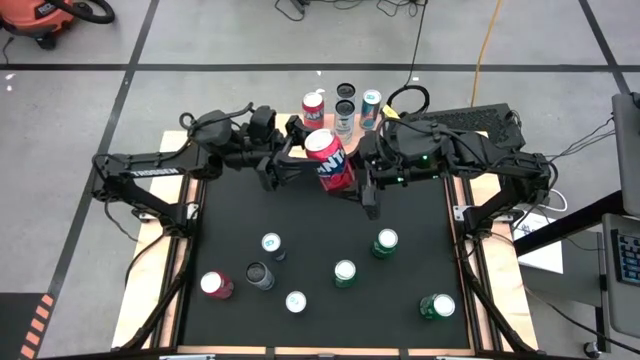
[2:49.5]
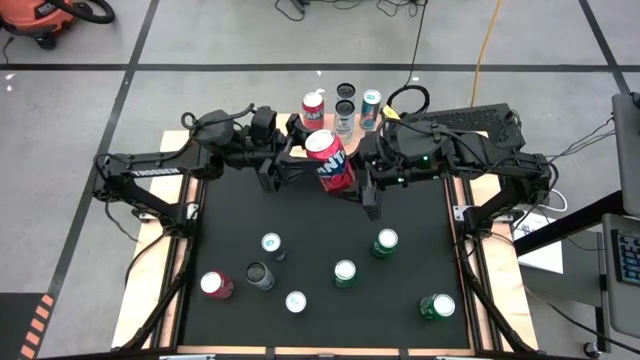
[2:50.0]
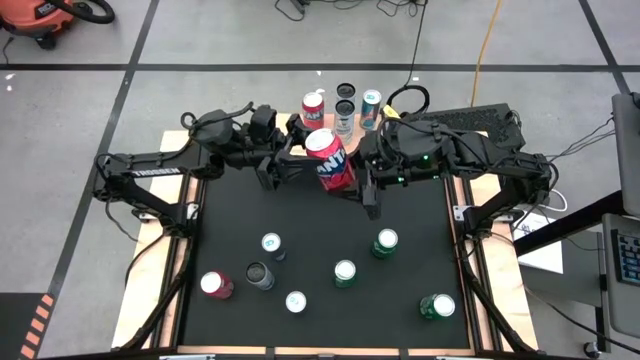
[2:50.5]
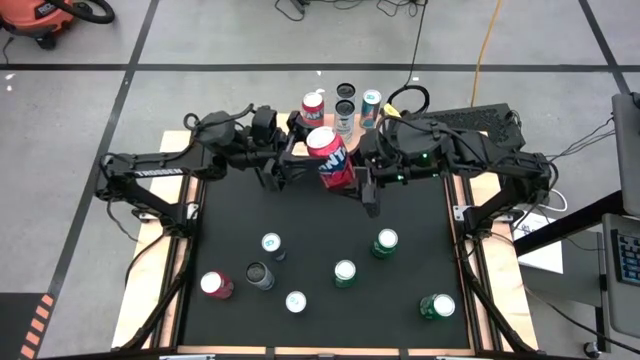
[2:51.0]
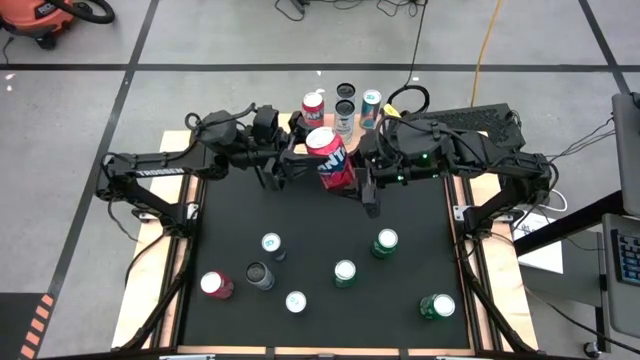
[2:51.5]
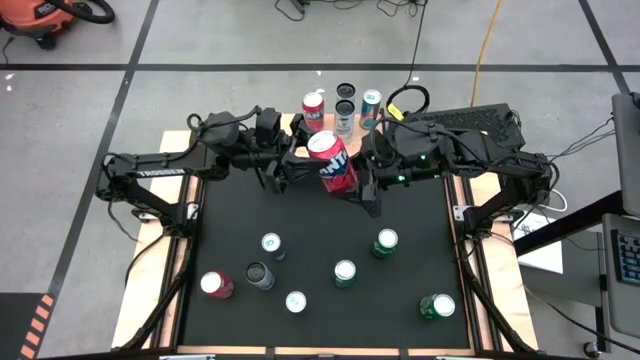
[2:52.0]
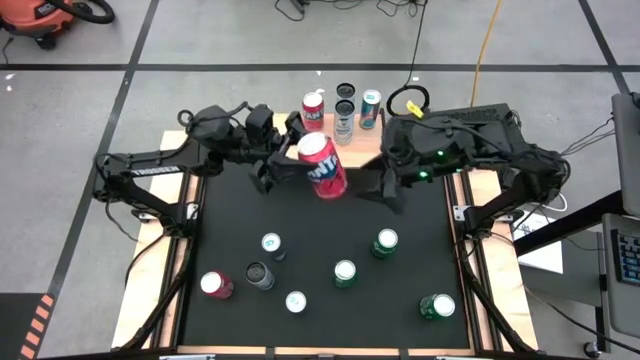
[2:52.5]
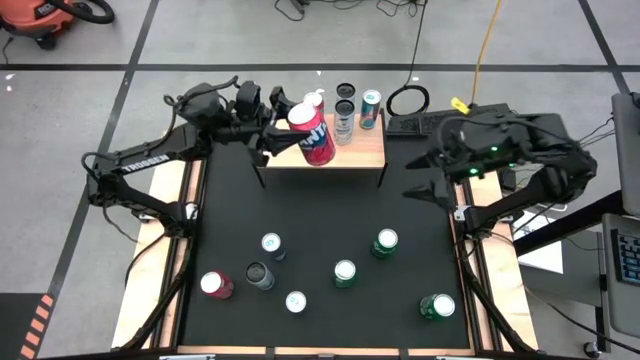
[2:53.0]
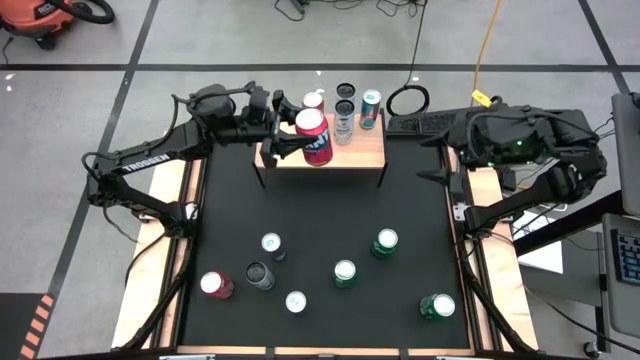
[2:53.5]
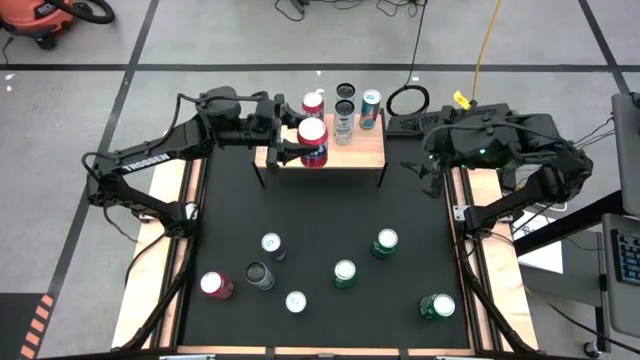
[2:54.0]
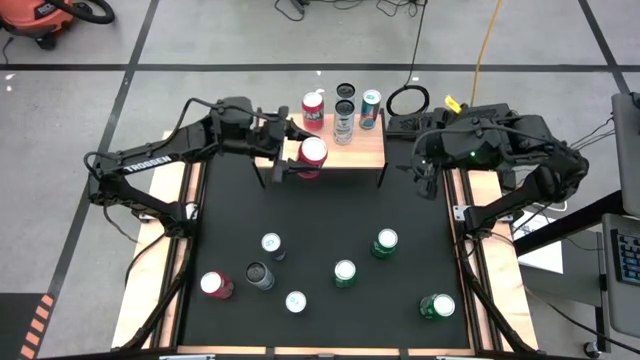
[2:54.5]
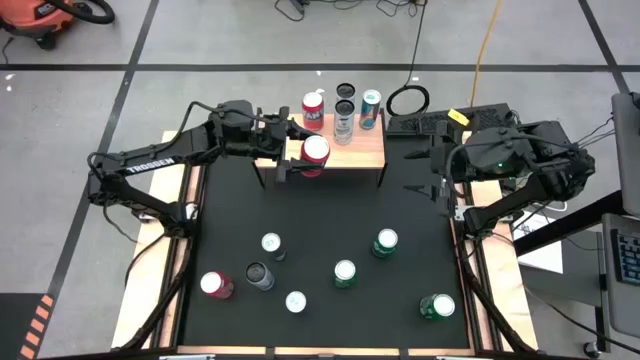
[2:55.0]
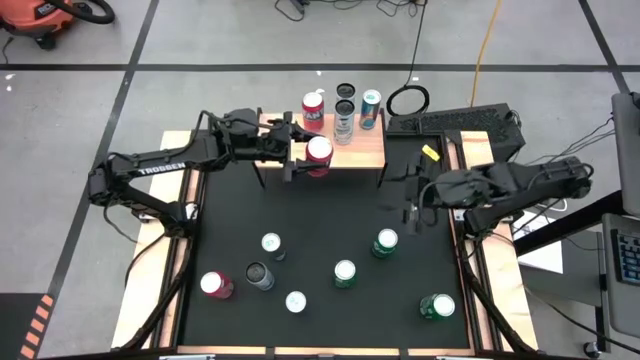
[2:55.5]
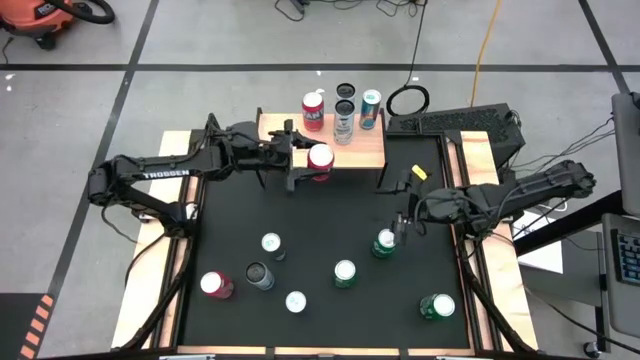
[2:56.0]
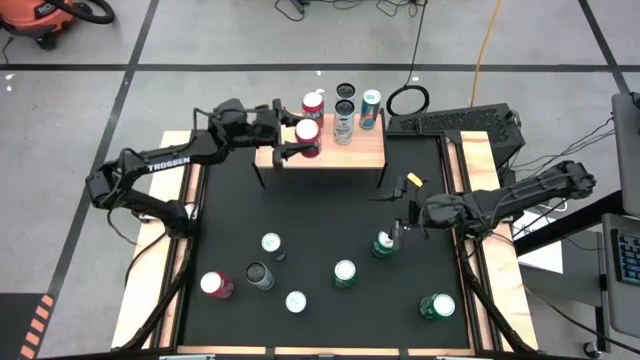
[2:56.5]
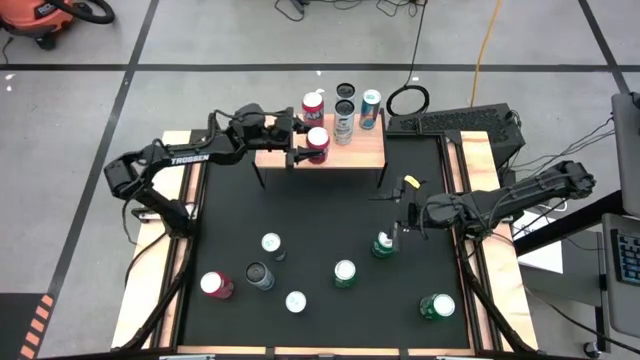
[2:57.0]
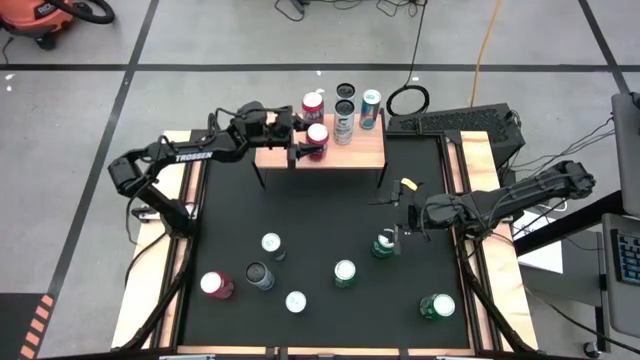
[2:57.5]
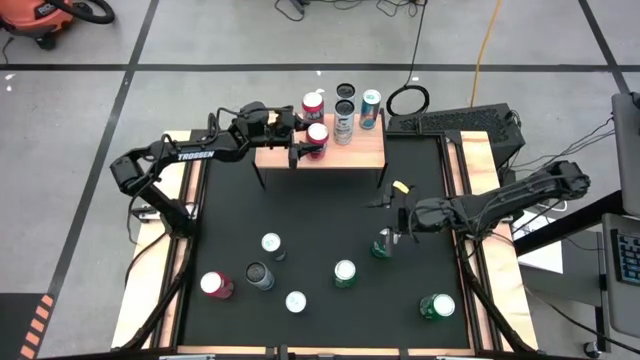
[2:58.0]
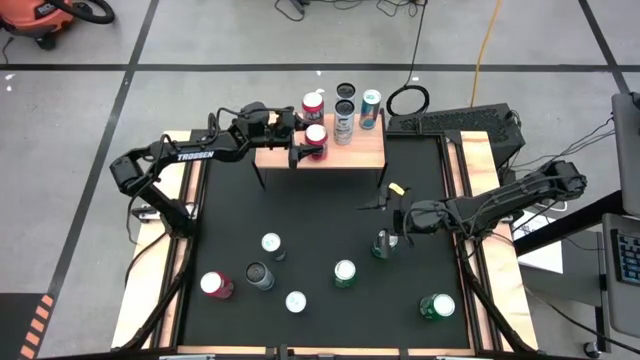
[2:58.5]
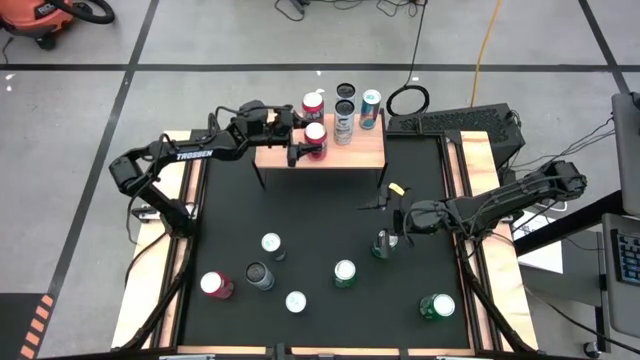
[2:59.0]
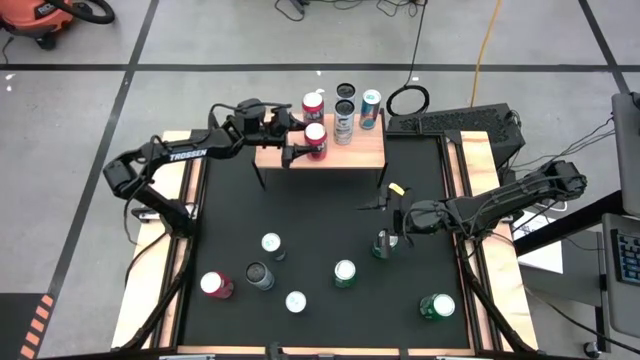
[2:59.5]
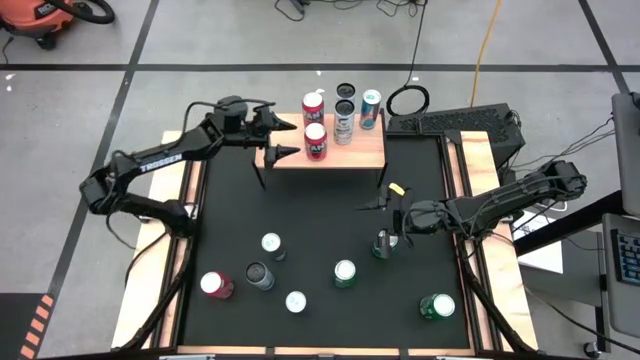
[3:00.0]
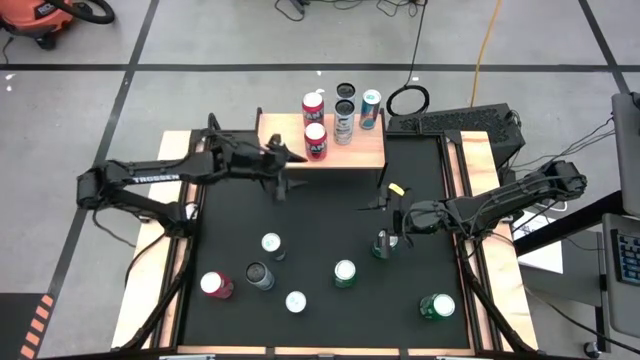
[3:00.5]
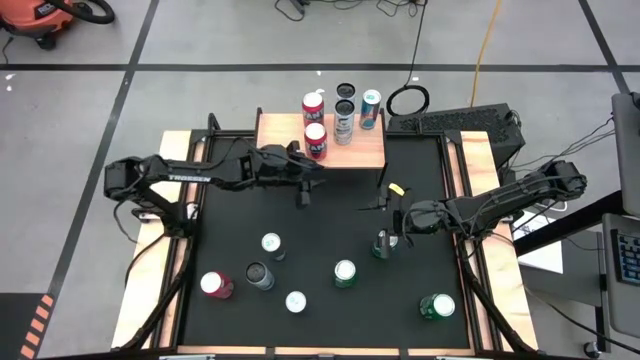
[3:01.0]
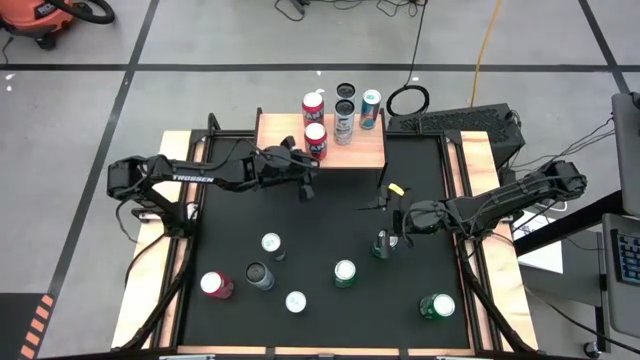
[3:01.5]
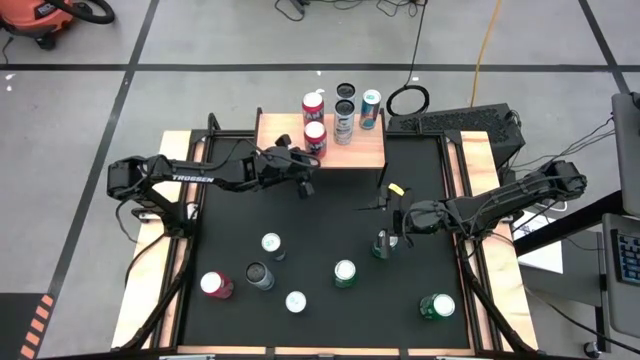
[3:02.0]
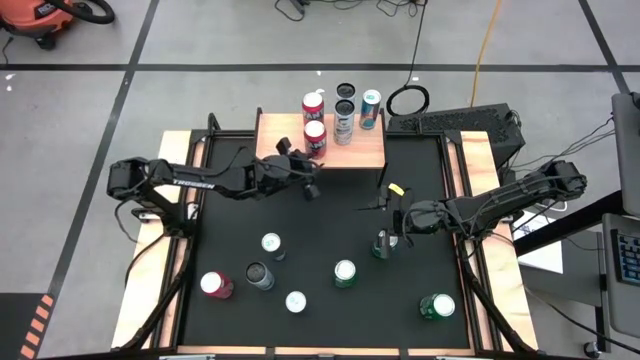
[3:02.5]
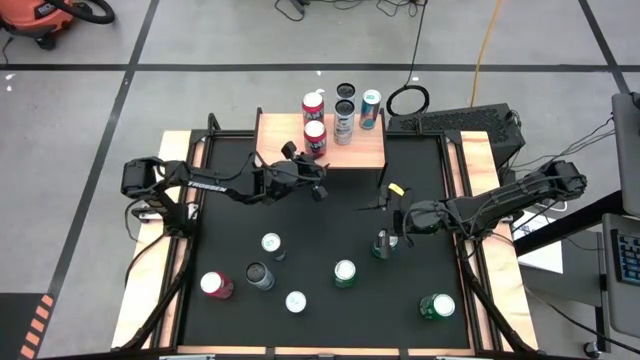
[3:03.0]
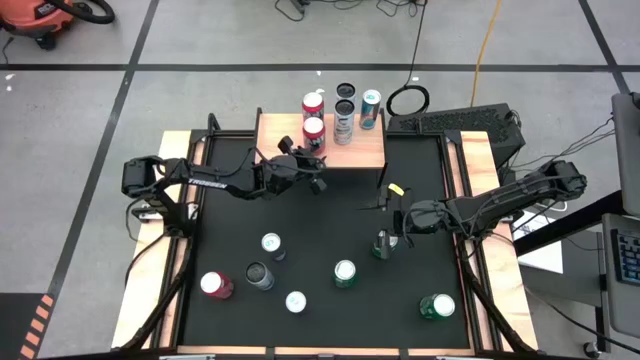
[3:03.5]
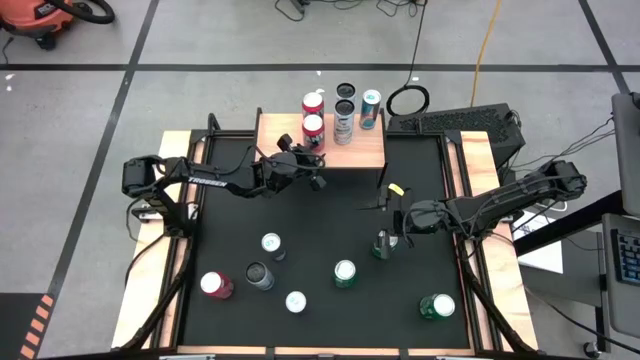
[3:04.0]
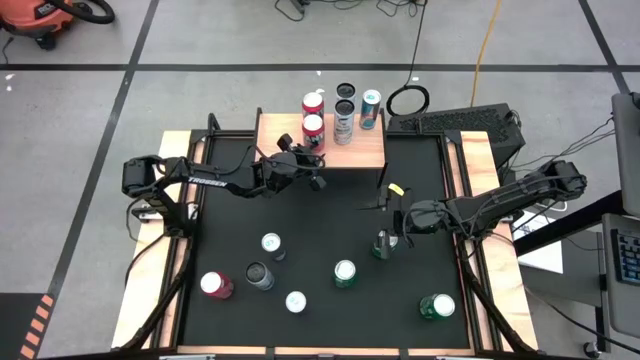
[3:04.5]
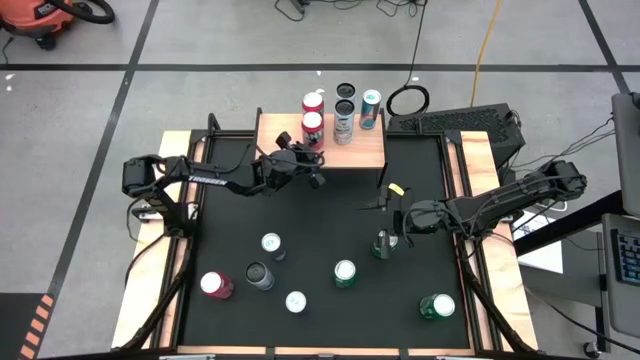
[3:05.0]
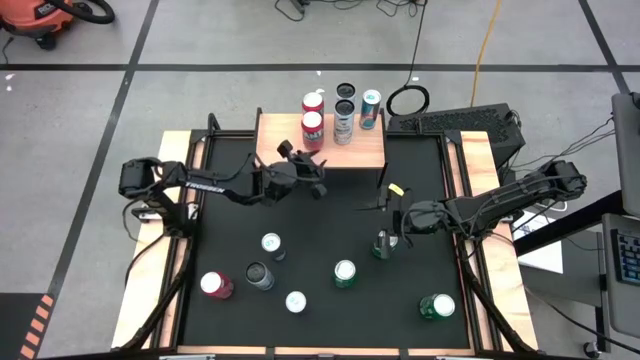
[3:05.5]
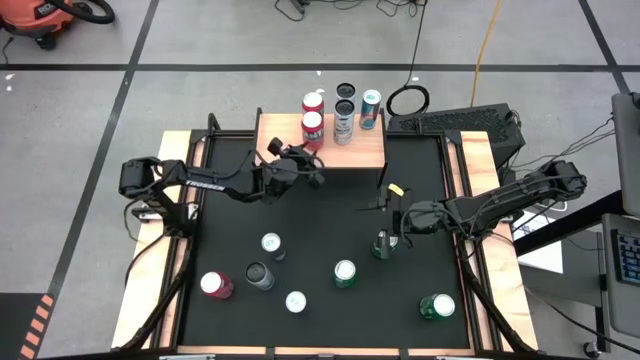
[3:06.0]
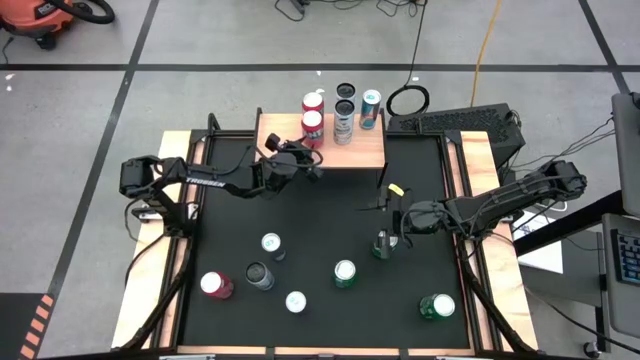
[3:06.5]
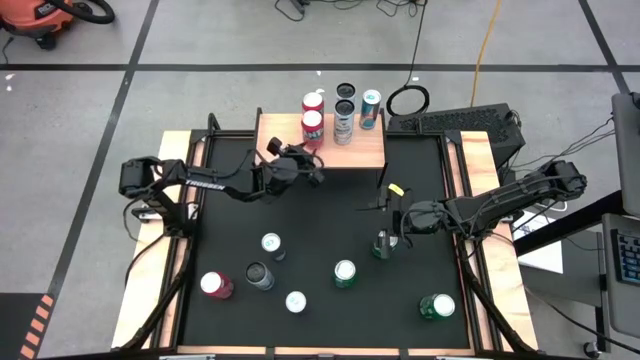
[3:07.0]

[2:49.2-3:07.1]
Task: Place canned beverage on shelf
Put the right orange soda can on the shelf aligned with the other orange soda can

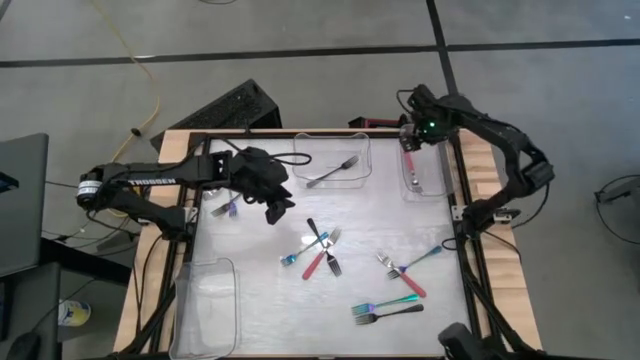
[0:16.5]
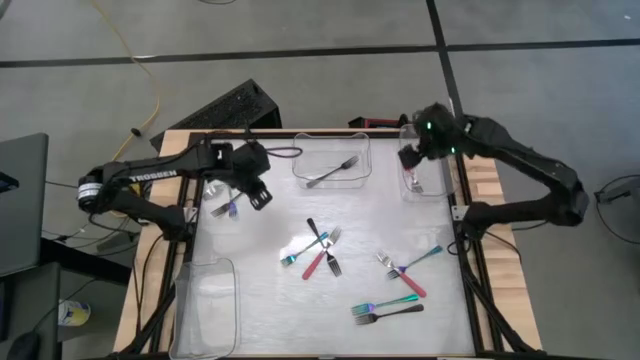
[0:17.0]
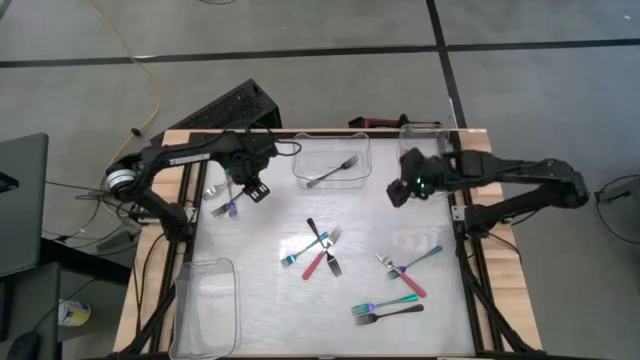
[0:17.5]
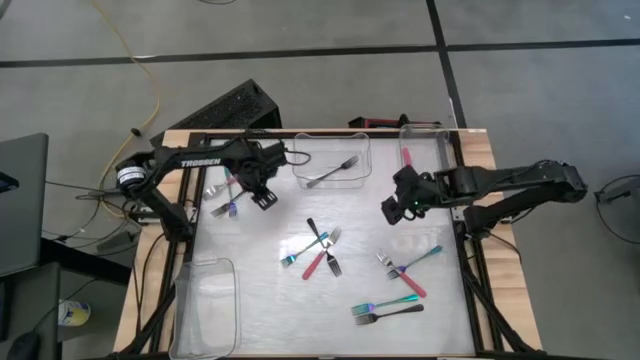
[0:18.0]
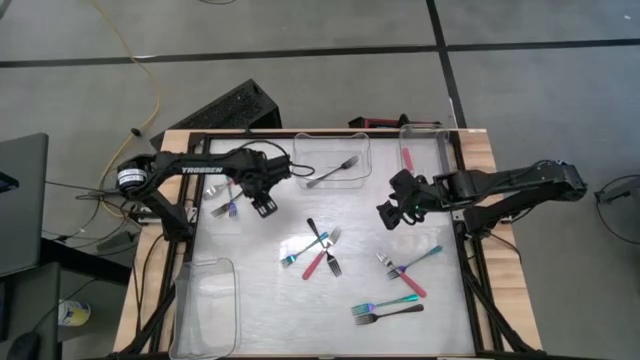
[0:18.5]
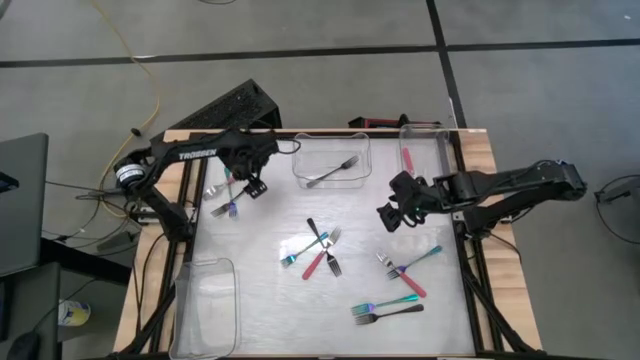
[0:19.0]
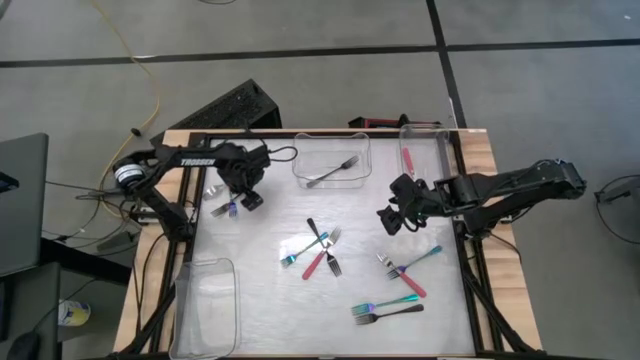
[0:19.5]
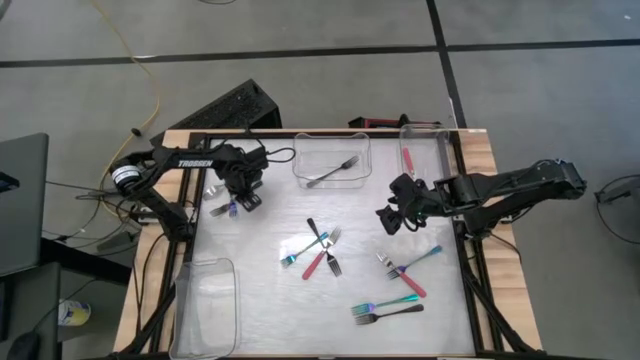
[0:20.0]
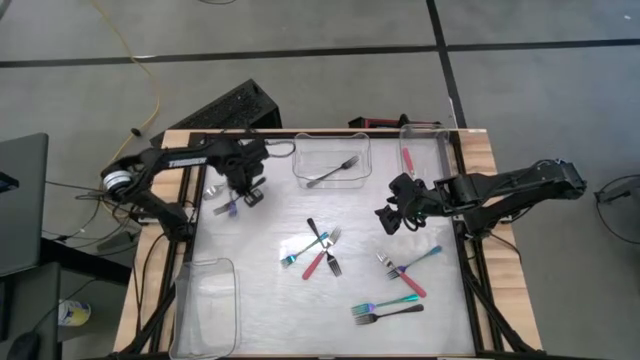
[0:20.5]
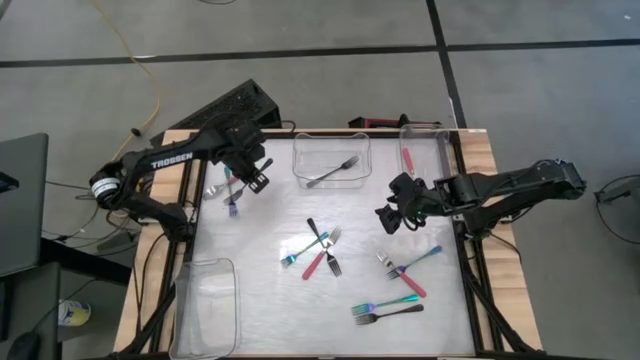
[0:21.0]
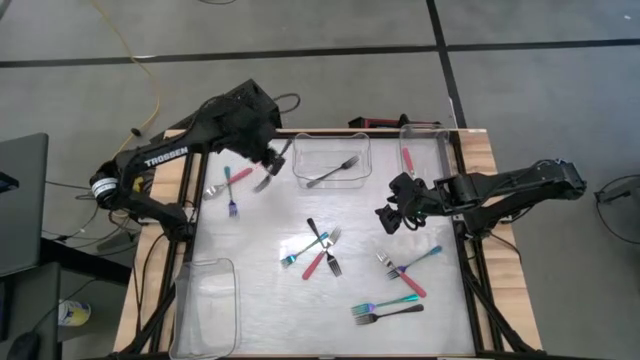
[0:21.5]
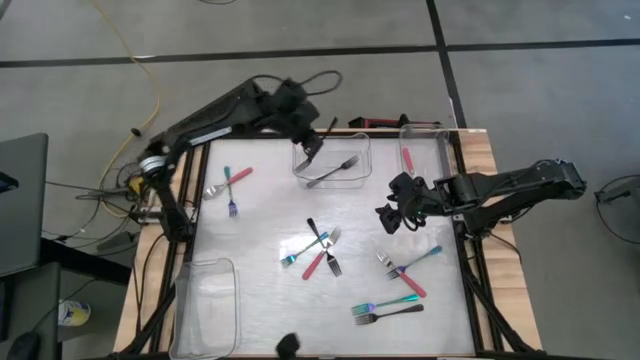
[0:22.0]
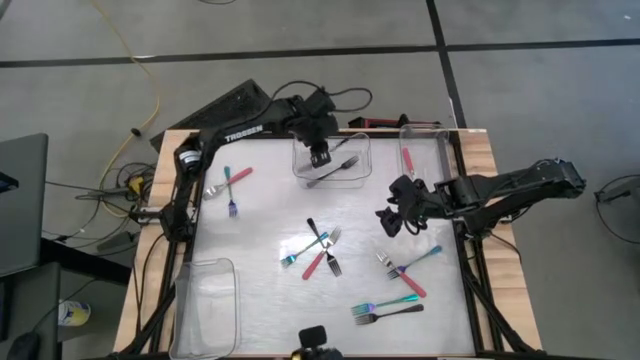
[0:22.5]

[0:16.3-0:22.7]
Task: Sort silverware by color (type)
Put the top black fork into the top left transparent bin
